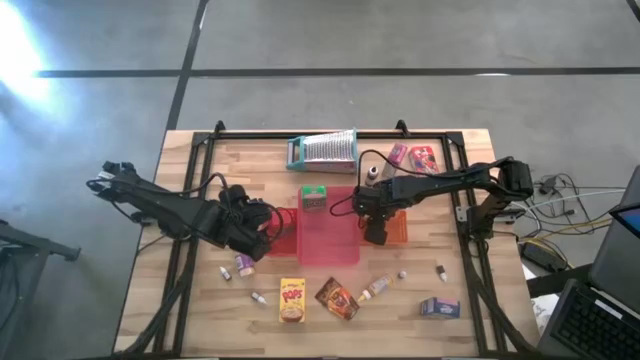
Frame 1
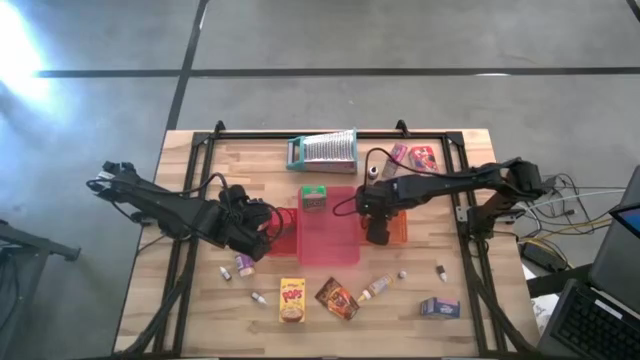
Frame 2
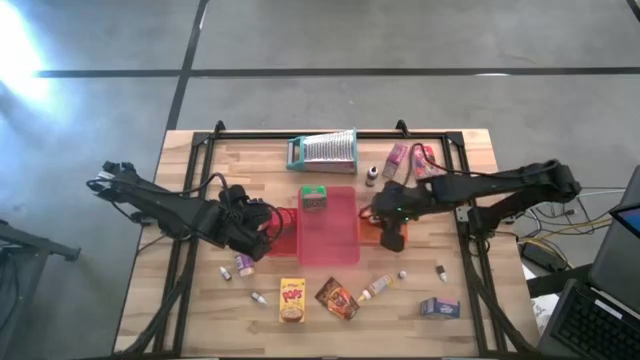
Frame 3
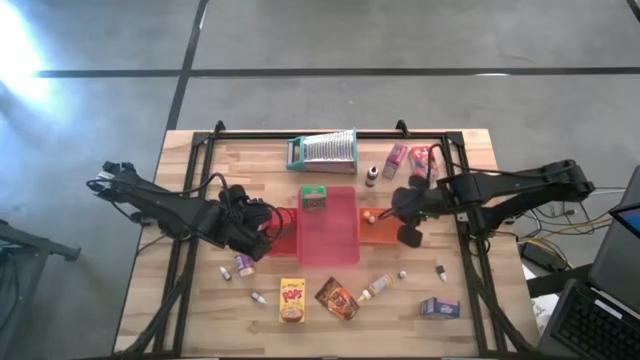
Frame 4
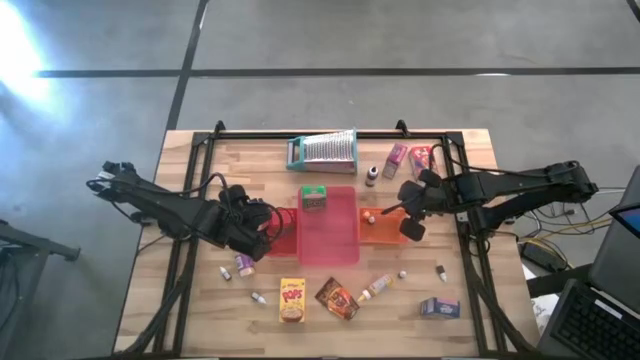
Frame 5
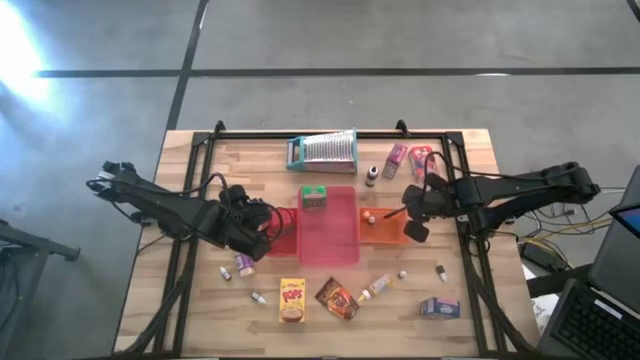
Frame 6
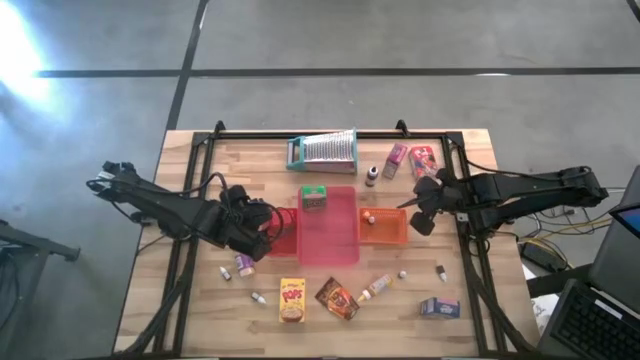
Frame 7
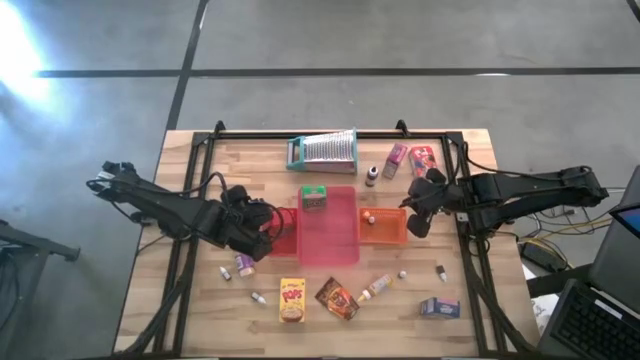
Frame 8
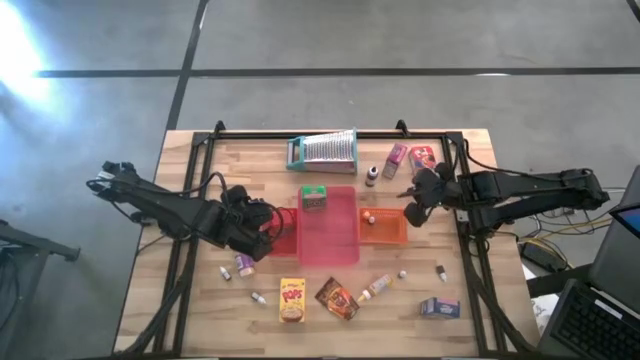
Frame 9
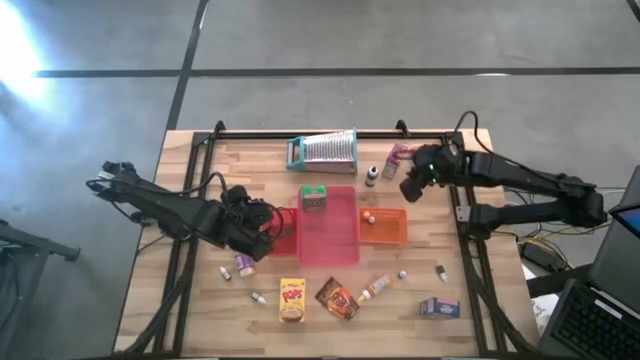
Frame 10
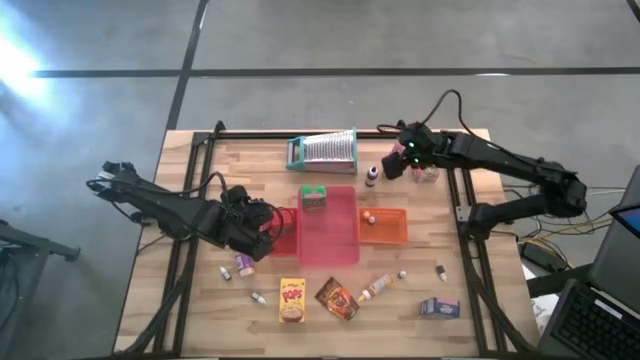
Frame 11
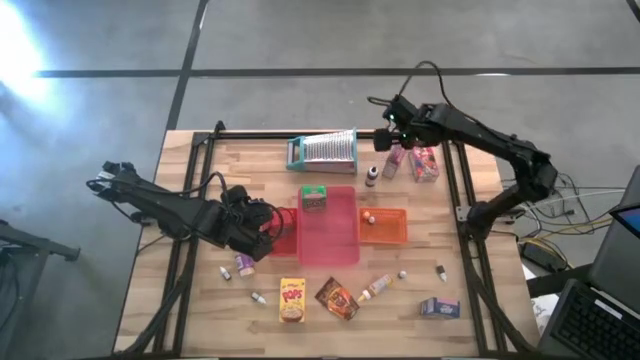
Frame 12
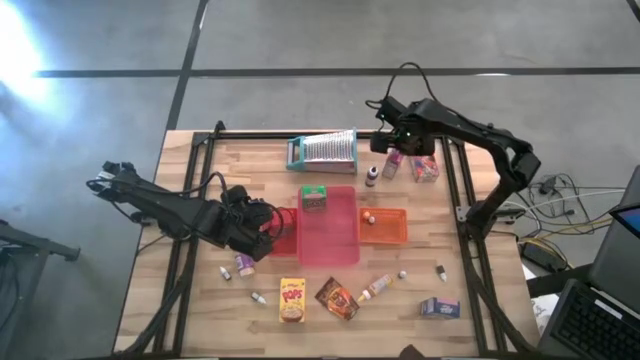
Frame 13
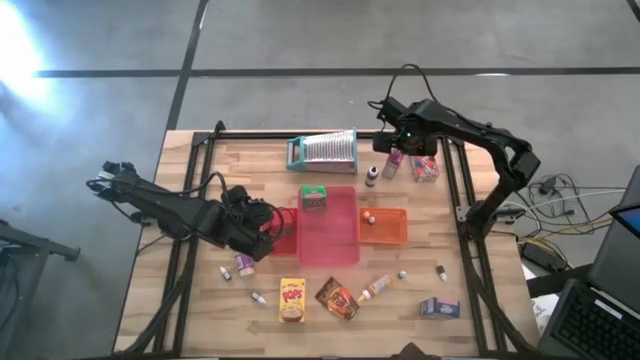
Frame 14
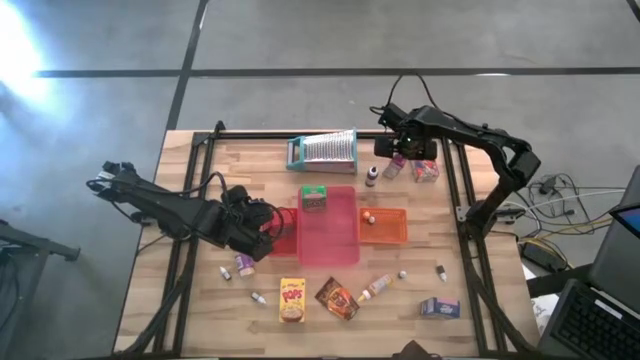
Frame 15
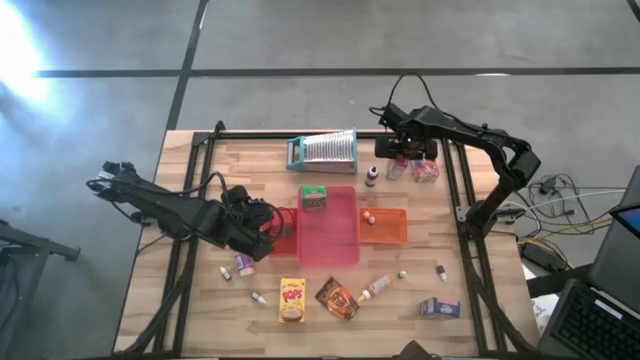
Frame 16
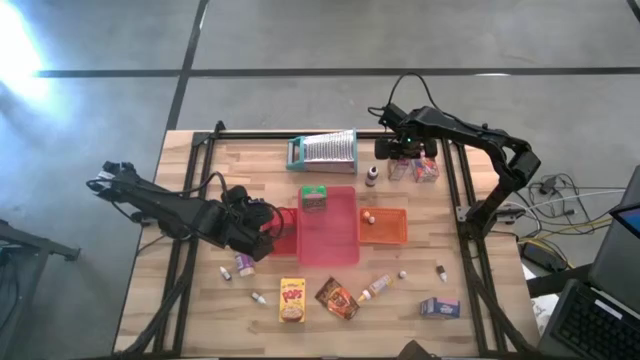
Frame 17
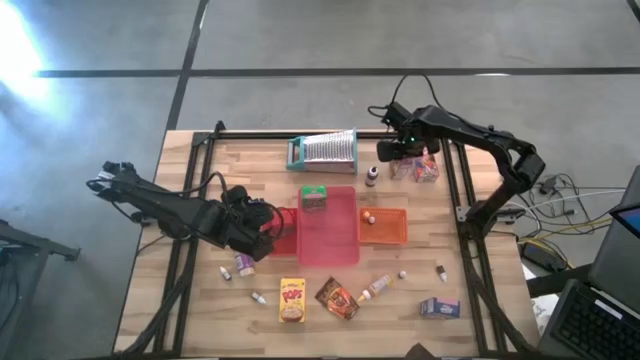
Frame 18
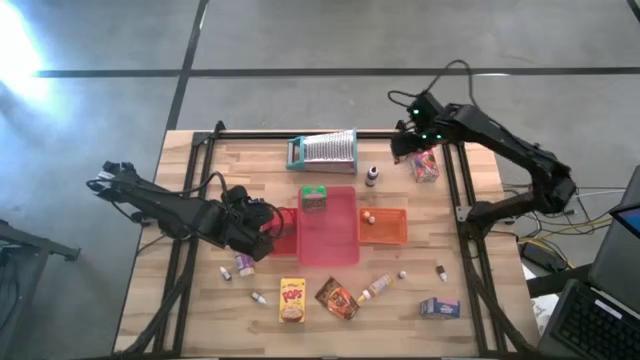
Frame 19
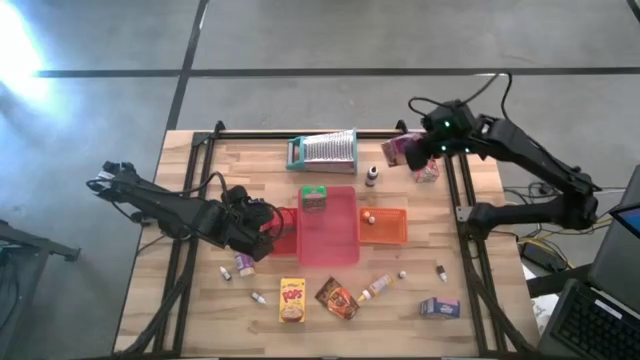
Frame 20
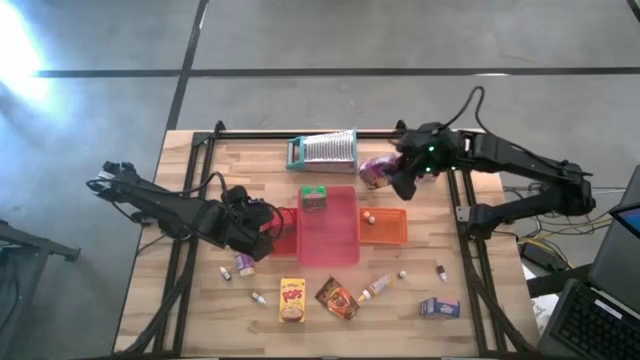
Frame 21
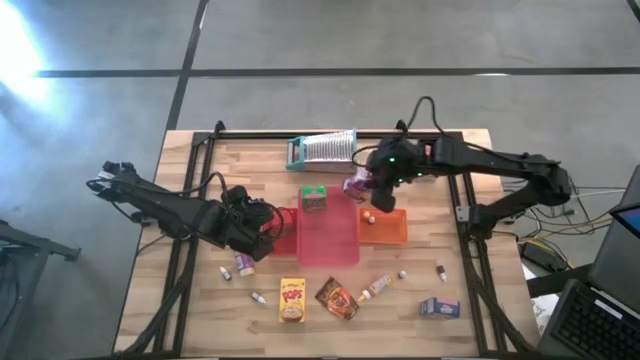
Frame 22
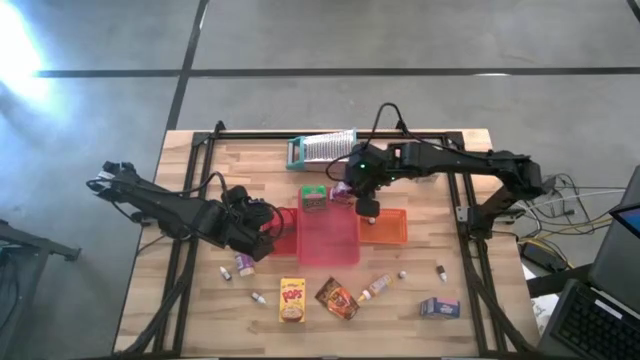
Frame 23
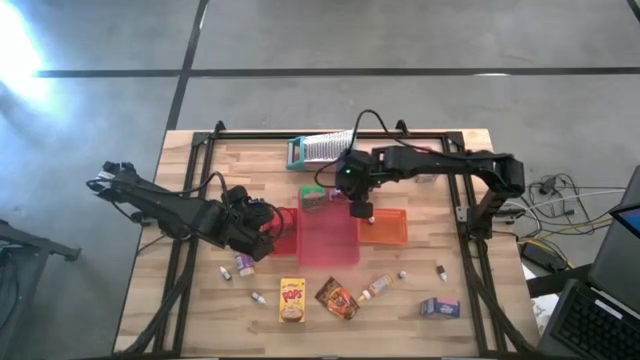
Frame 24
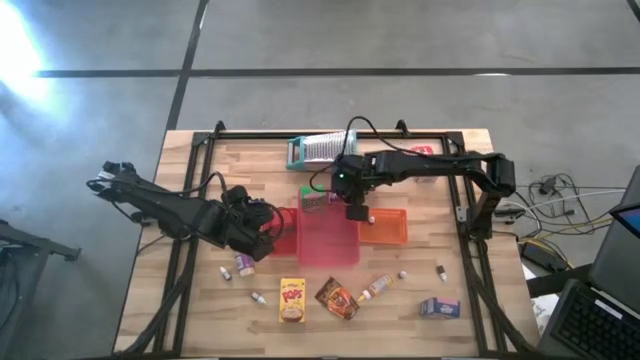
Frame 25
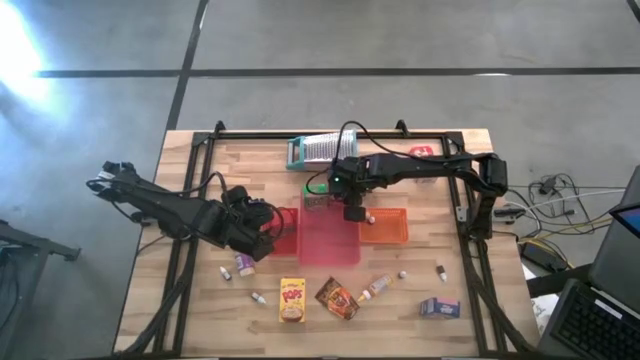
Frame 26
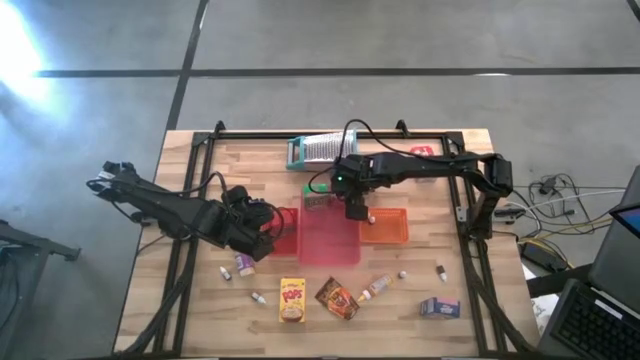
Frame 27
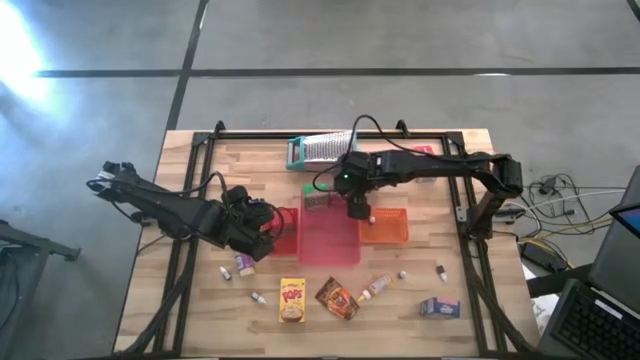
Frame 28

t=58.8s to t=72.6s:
Task: Pick & Place Kitchen Items
Put the purple cereal box into the pink bin

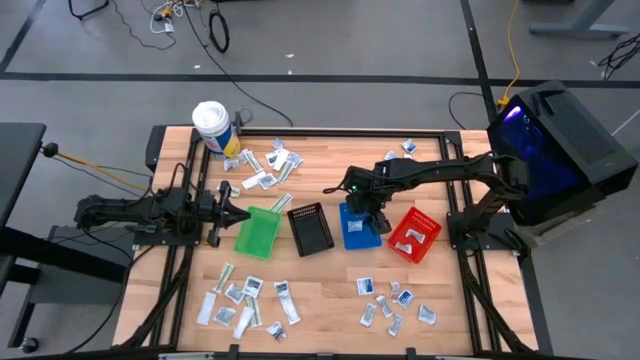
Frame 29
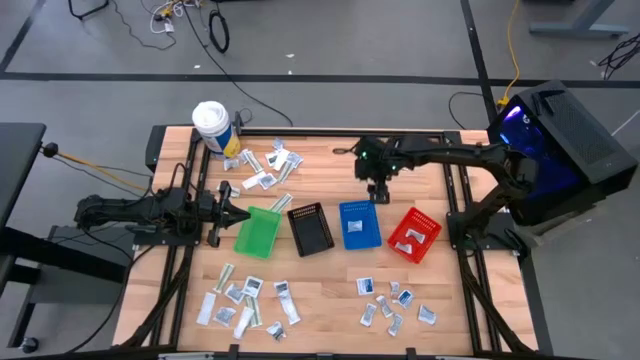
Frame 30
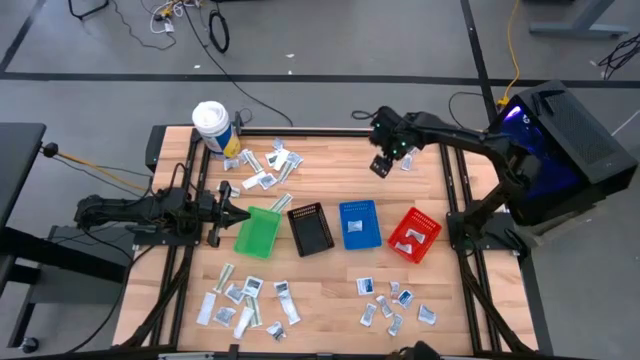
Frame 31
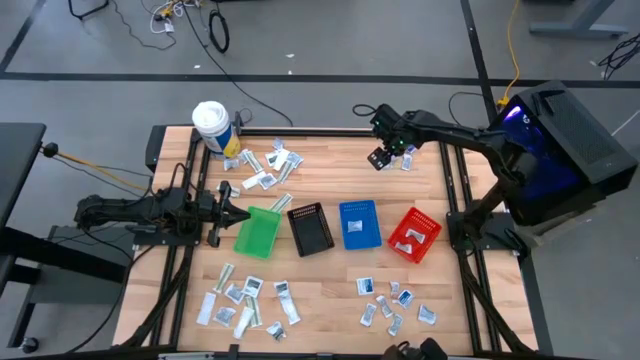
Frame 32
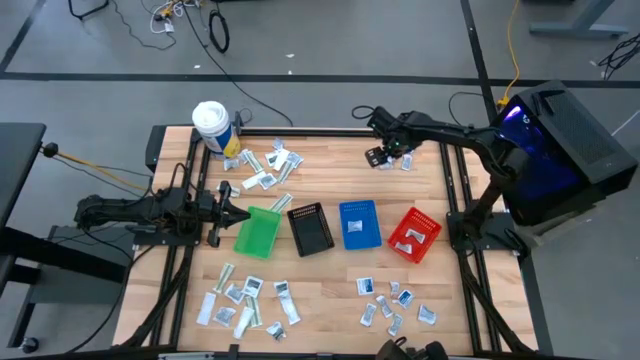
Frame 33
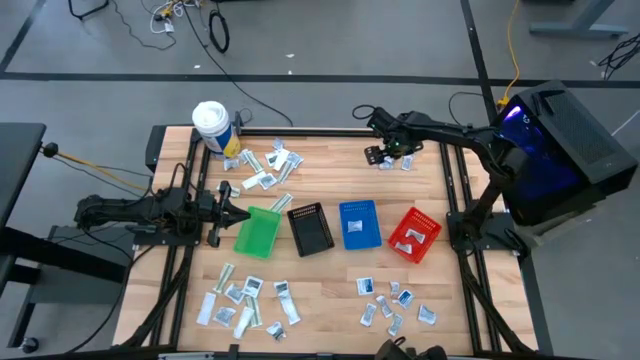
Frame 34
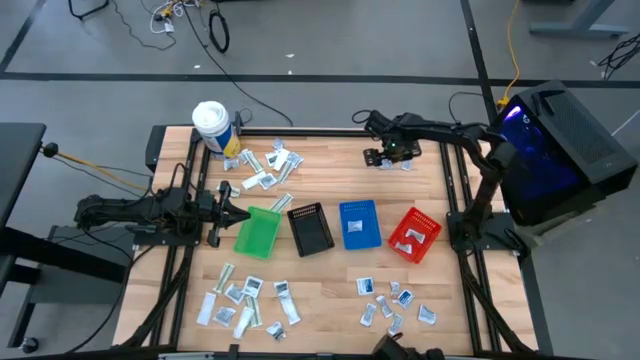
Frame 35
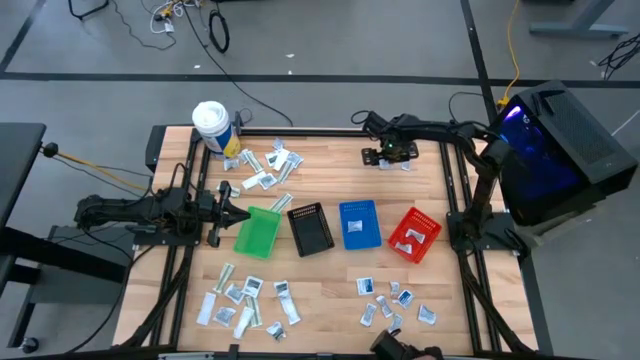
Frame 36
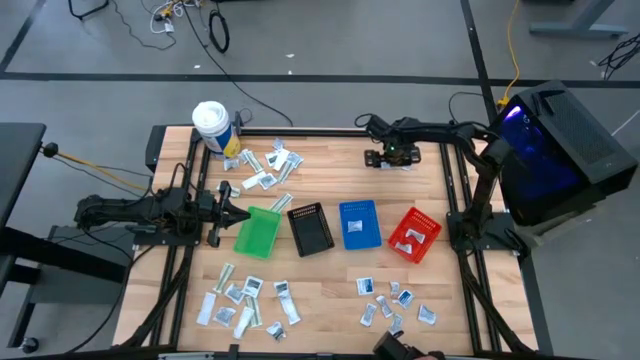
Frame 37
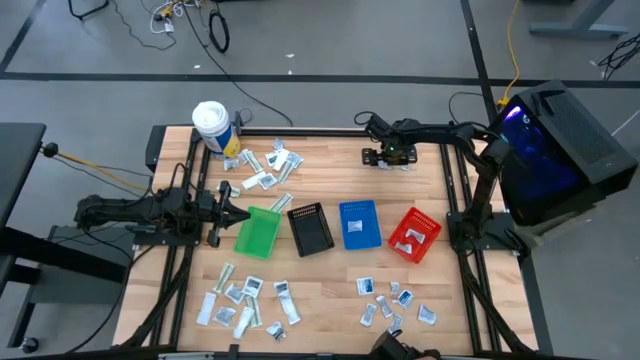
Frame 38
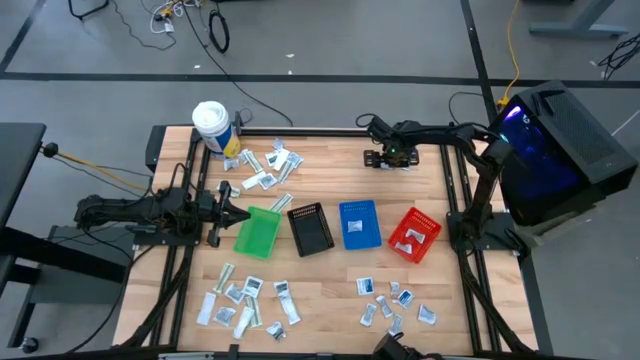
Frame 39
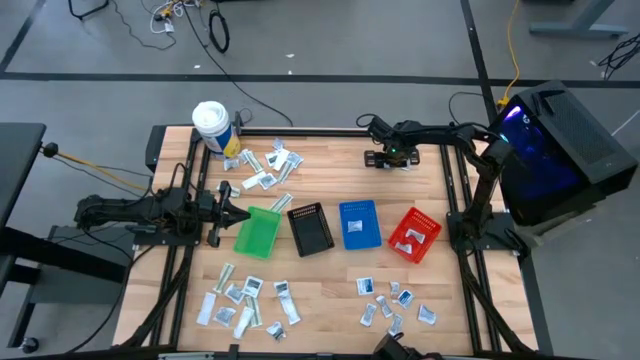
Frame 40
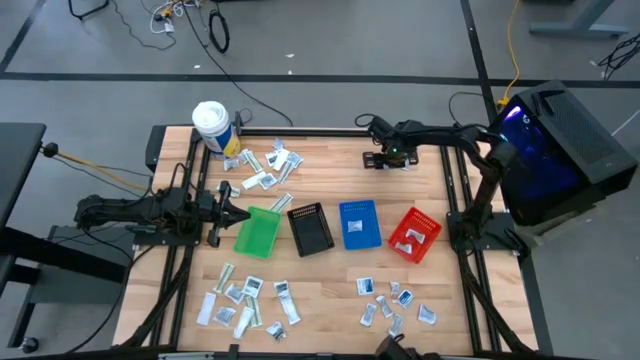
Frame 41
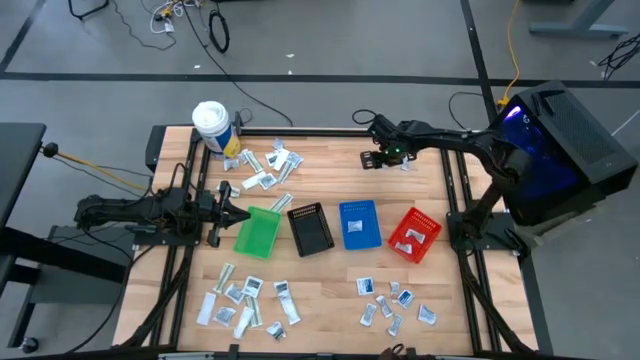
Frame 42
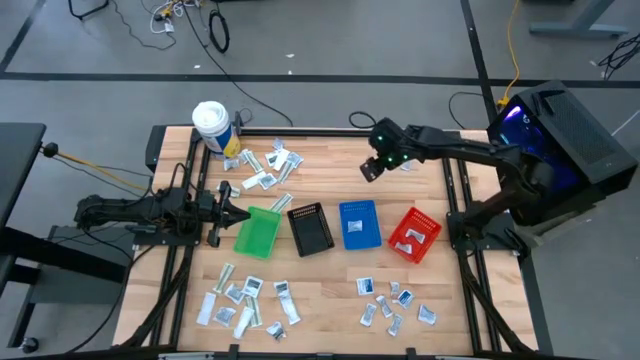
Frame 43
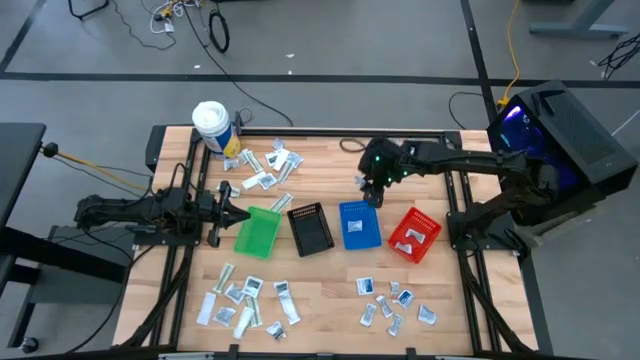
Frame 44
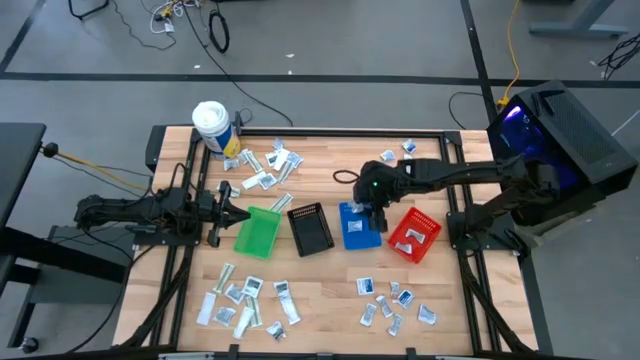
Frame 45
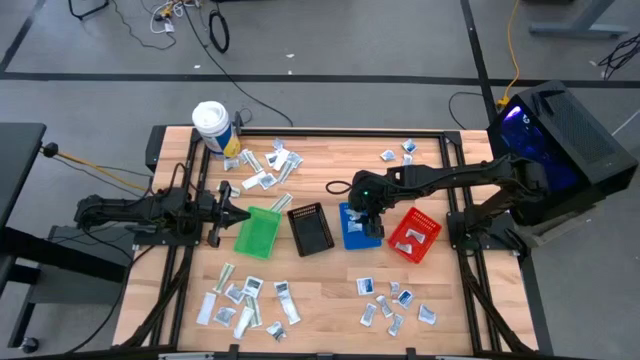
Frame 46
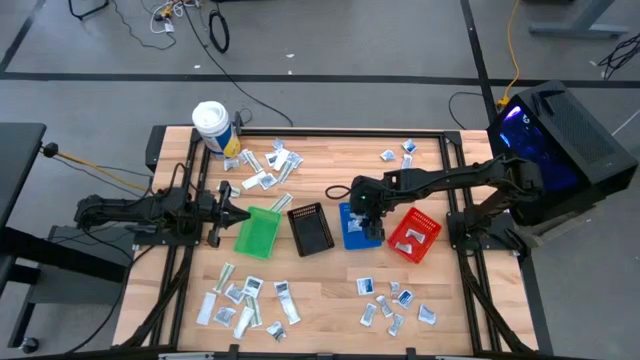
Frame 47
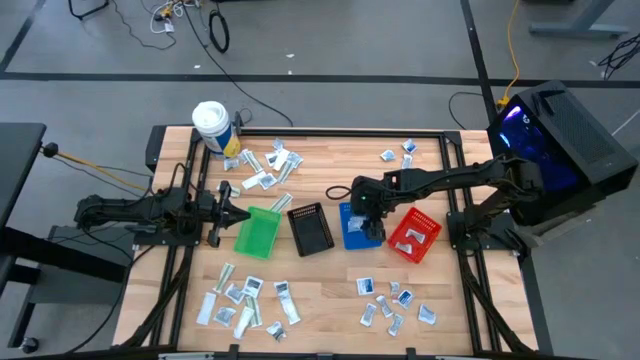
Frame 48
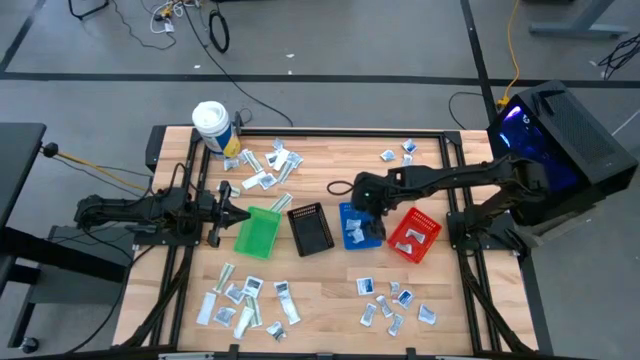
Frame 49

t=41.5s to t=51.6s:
Task: Pick & Place First Aid Supplies
Put the alcohol pad into the blue basket
